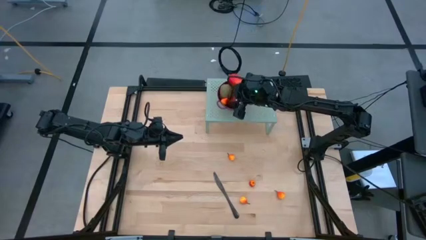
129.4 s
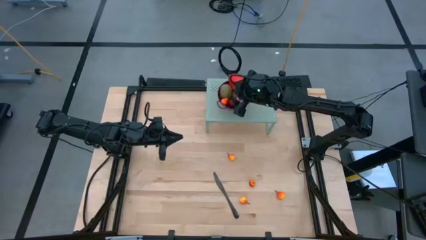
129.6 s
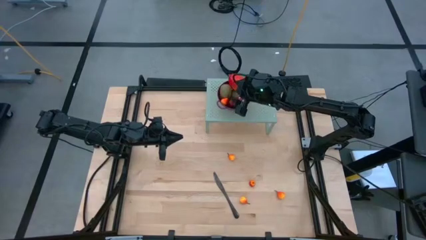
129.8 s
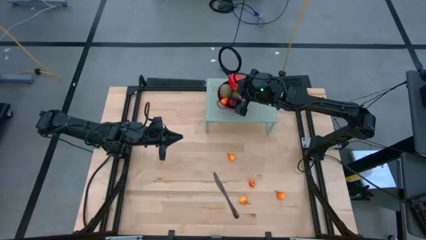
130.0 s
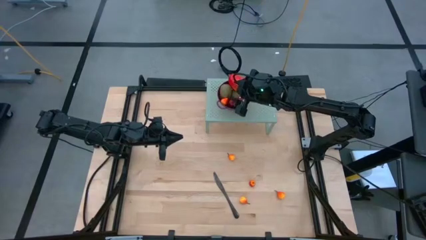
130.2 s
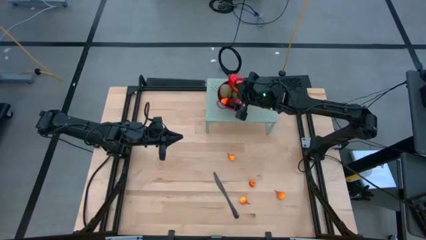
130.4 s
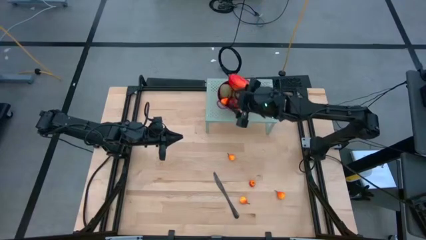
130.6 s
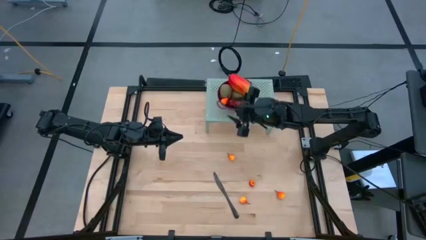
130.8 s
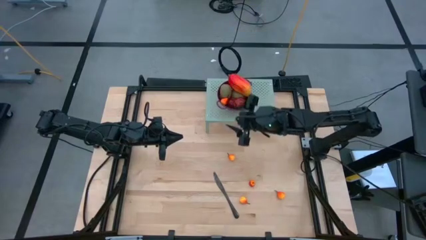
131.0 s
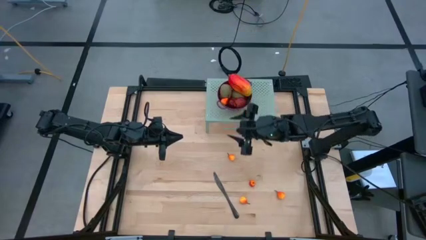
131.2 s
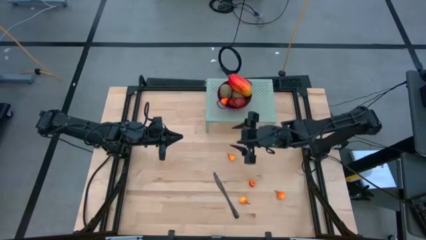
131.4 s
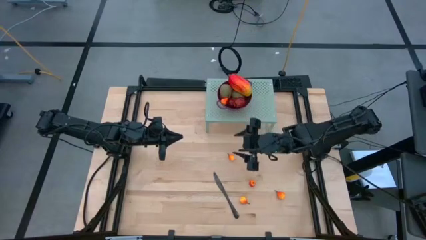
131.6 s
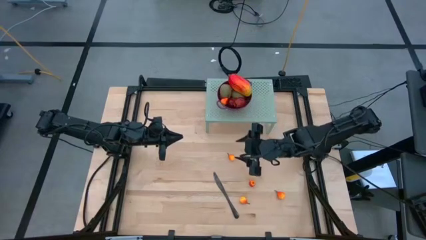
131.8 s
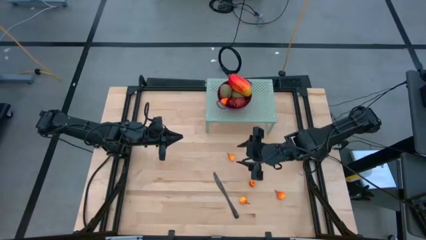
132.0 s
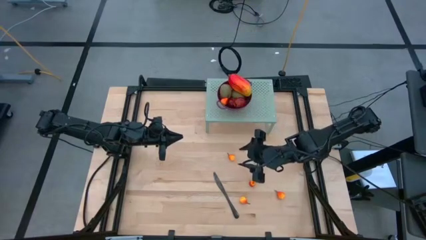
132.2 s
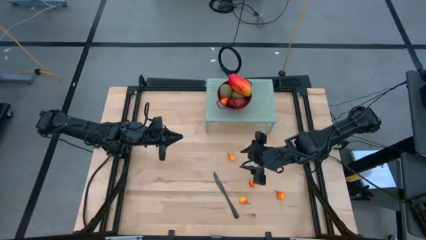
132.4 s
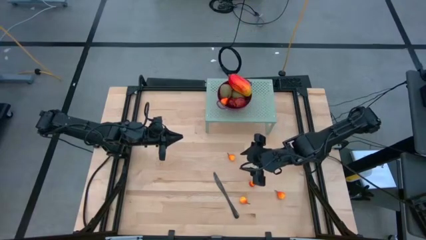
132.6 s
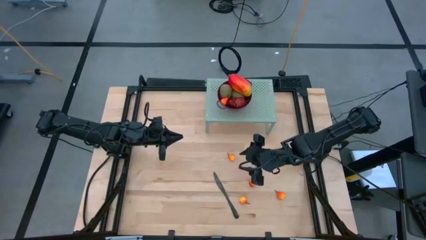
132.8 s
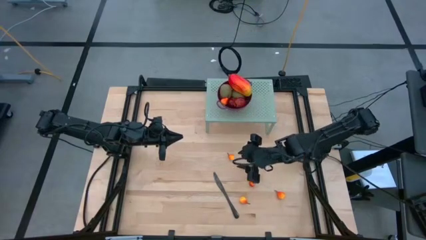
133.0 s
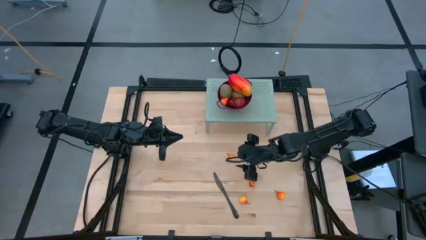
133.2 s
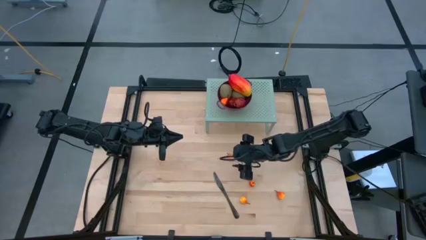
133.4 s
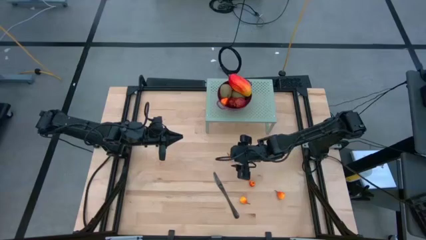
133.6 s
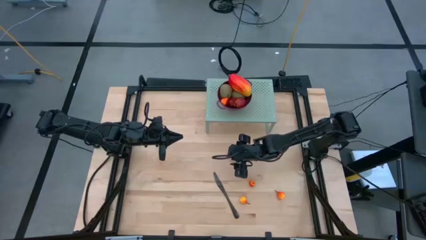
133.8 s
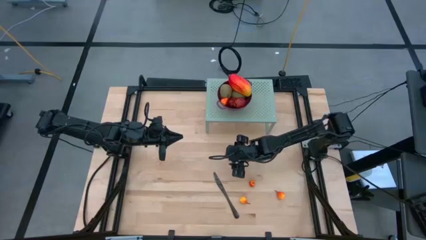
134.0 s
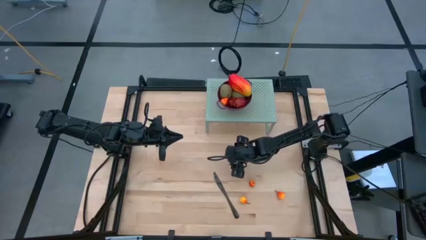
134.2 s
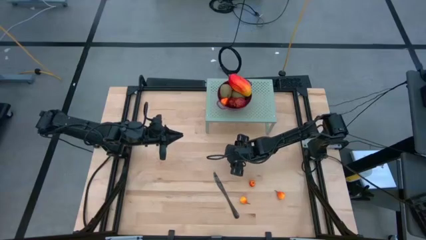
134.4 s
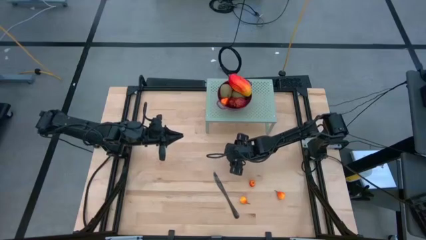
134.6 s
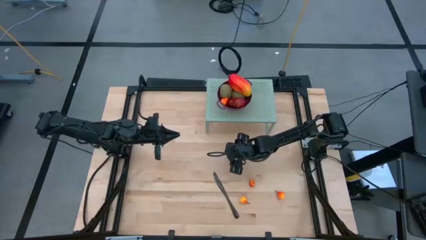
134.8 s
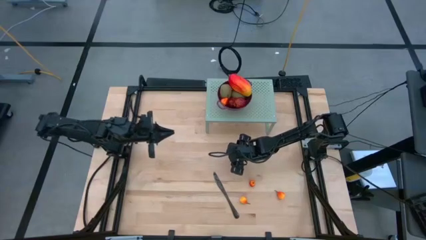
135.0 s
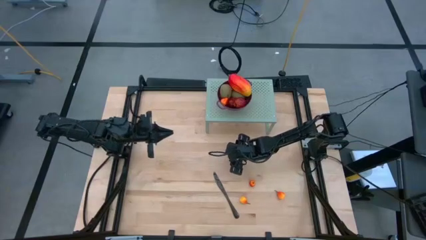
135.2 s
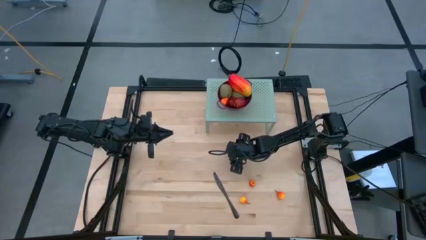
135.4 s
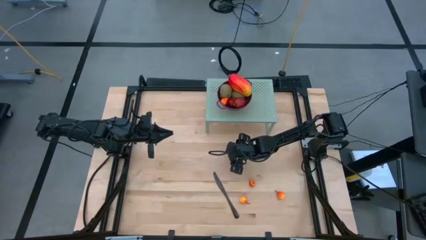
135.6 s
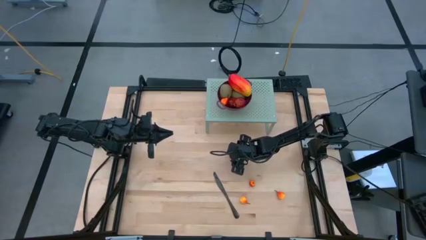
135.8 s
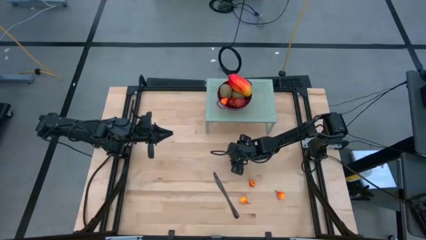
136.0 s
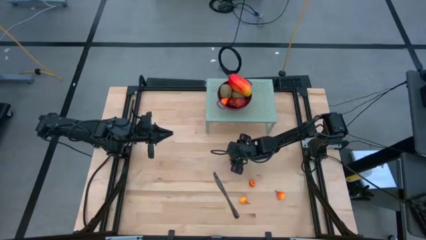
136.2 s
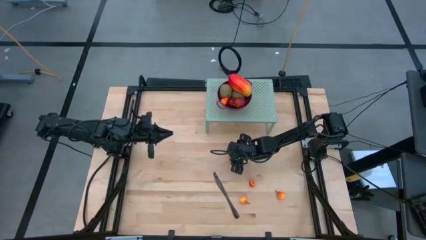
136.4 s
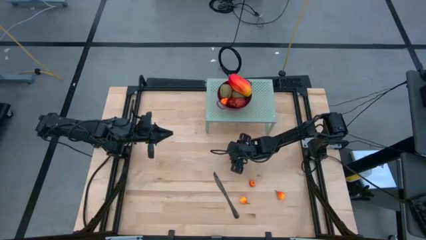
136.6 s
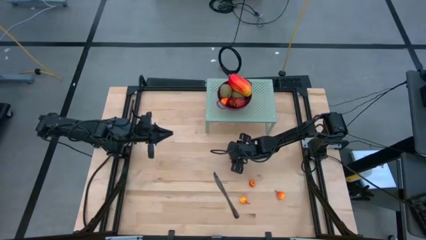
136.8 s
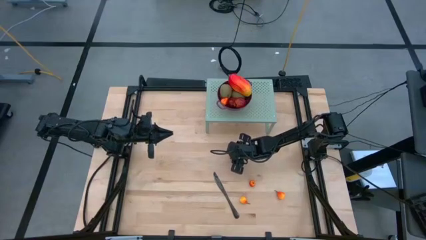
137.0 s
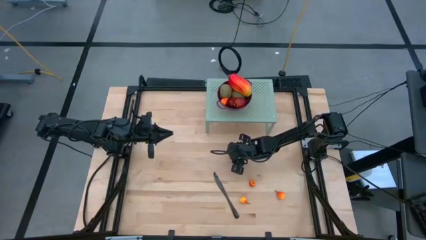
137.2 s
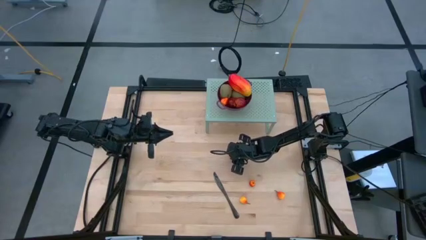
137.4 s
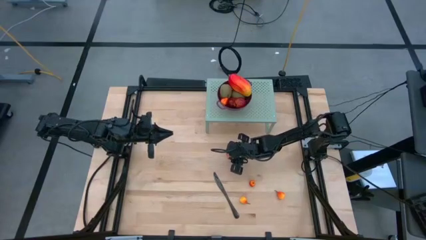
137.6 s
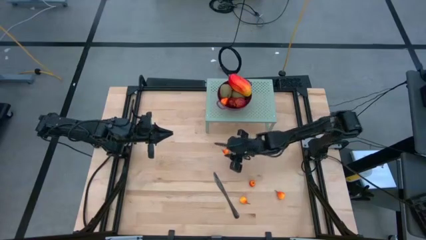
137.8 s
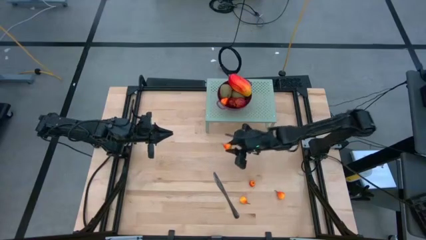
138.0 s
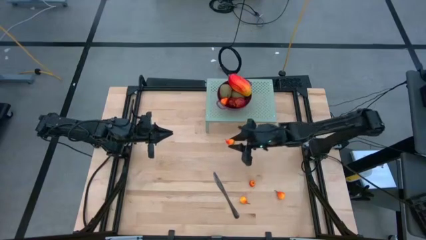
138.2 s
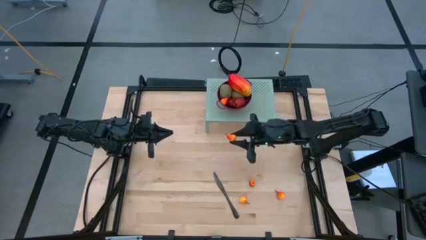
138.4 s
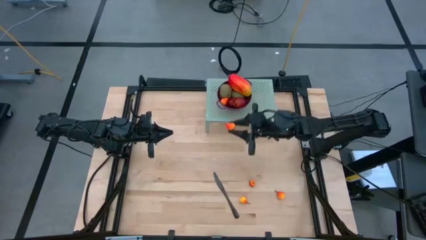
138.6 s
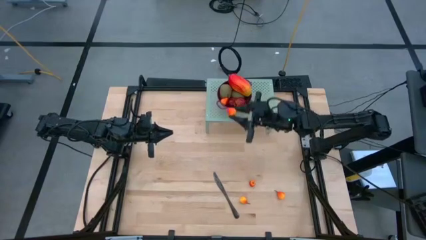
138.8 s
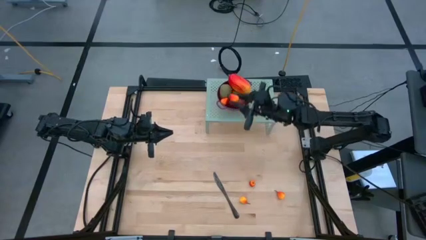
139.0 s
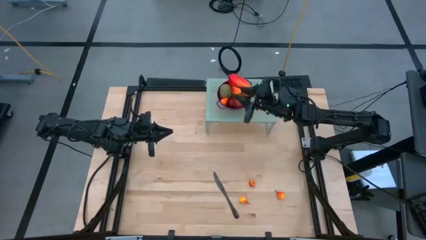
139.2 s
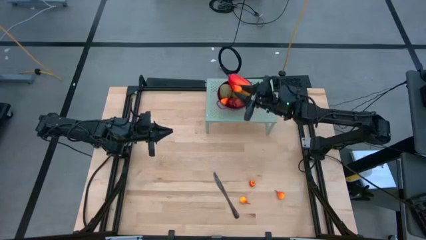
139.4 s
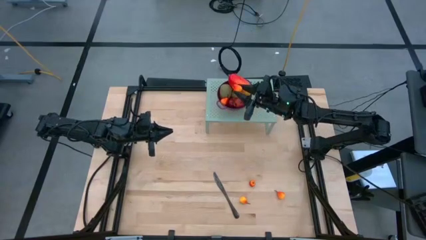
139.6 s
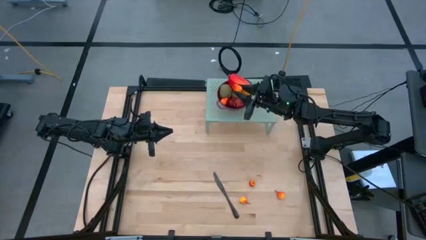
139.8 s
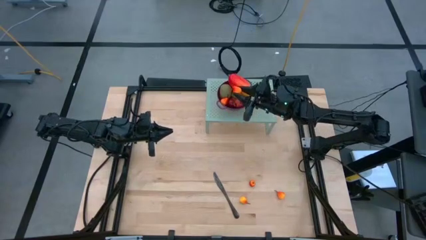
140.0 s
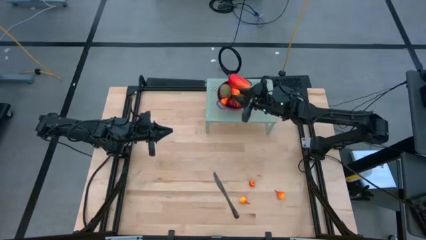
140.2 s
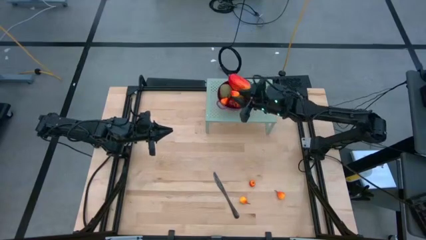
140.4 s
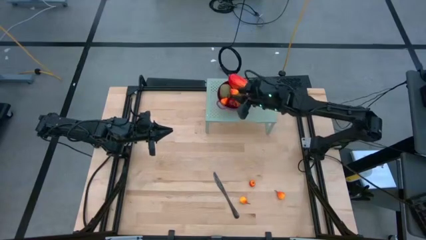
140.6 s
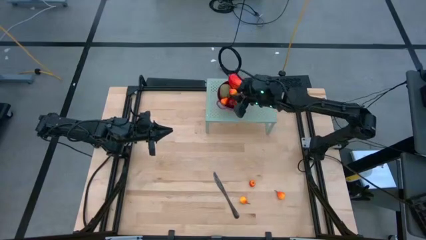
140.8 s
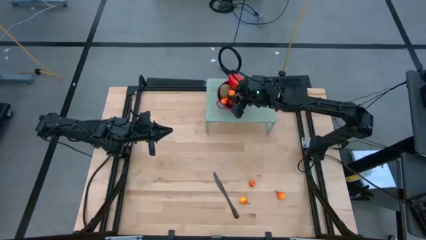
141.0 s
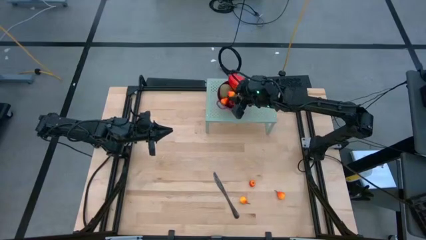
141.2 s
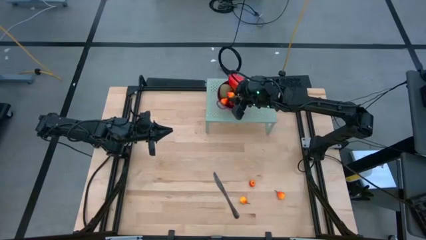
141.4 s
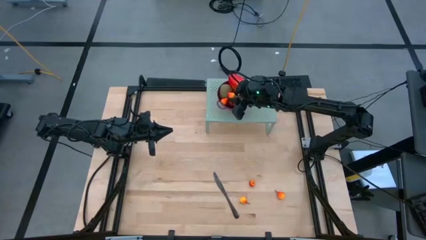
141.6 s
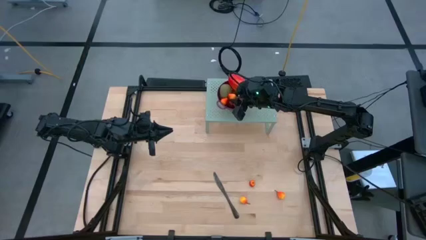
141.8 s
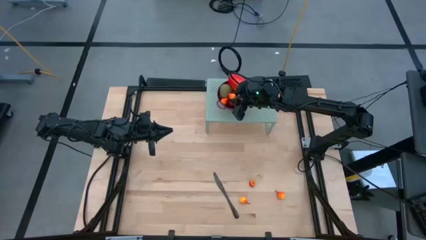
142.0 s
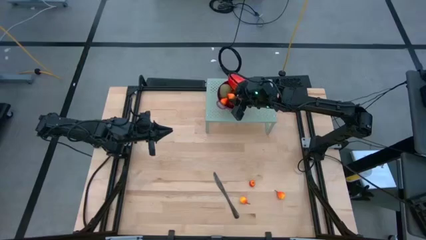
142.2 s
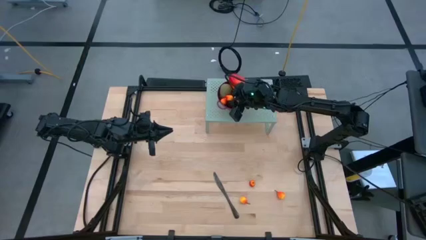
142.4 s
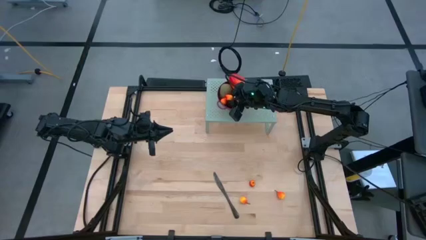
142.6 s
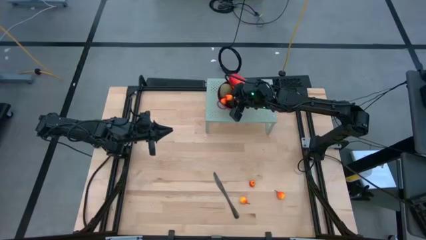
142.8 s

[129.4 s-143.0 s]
Task: Pick & Place Fruit
Put the orange pear into the violet strainer bowl on the shelf

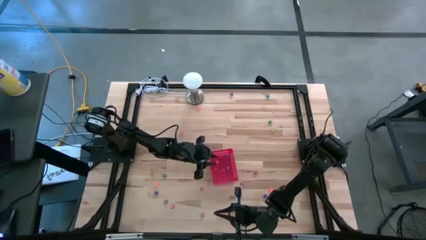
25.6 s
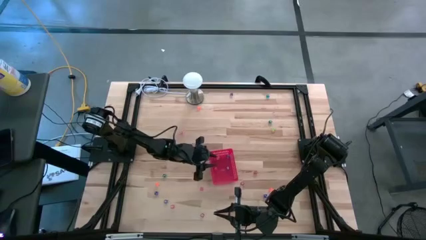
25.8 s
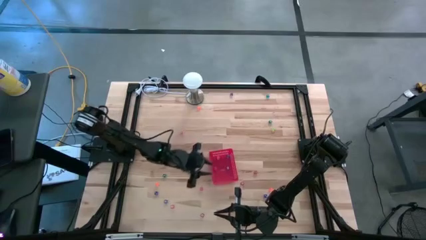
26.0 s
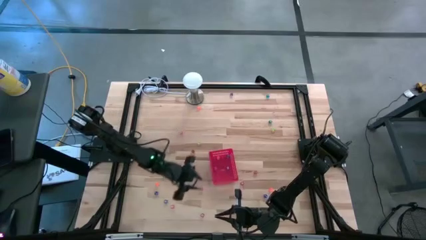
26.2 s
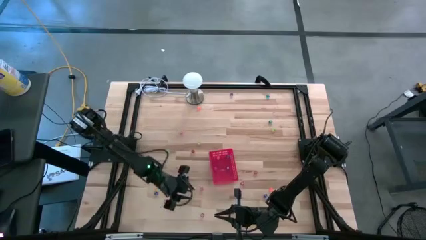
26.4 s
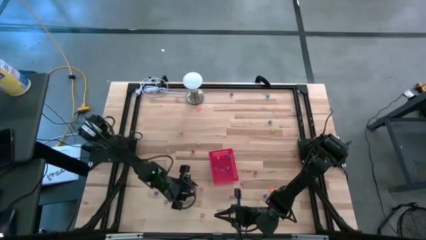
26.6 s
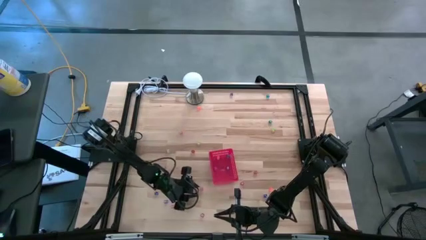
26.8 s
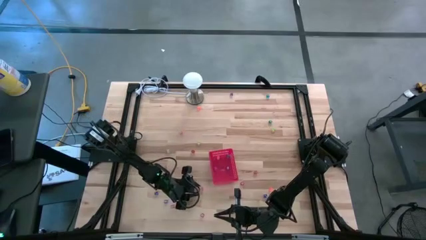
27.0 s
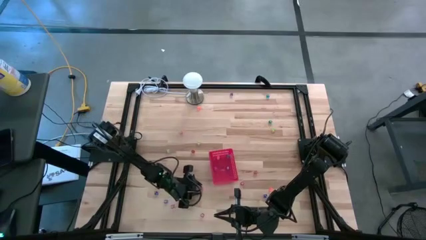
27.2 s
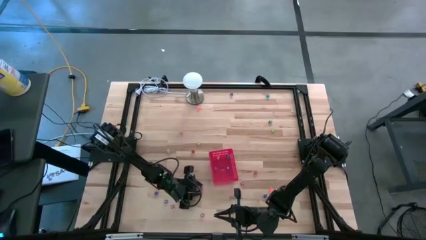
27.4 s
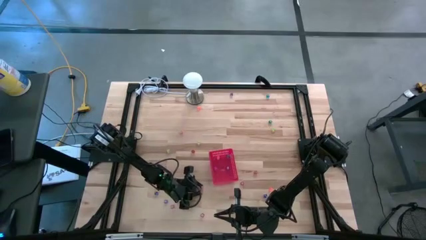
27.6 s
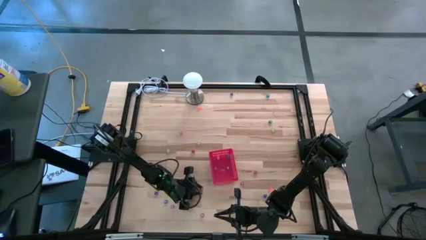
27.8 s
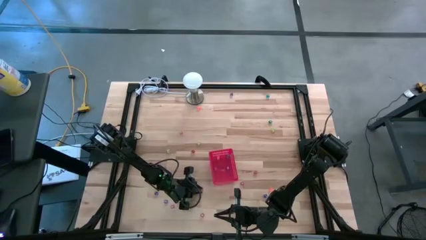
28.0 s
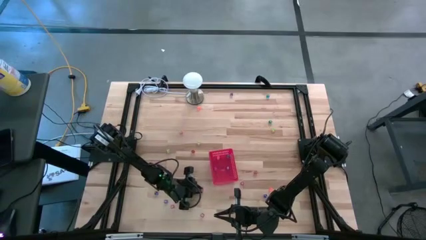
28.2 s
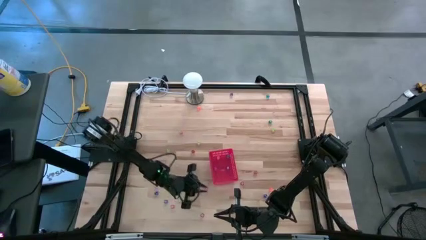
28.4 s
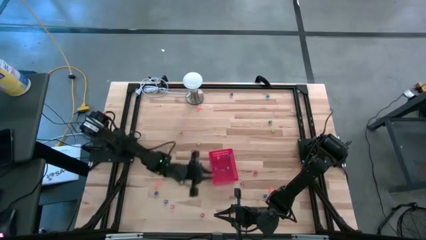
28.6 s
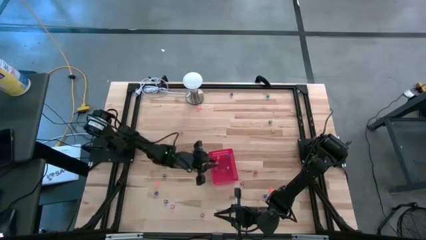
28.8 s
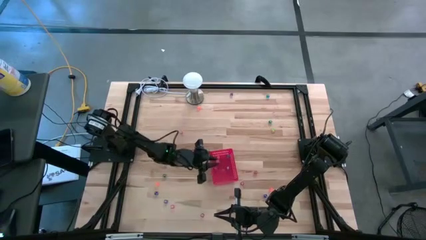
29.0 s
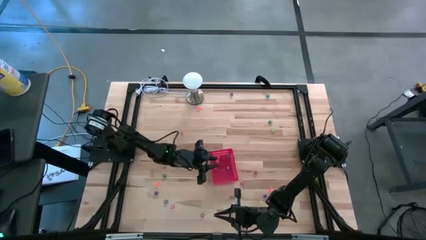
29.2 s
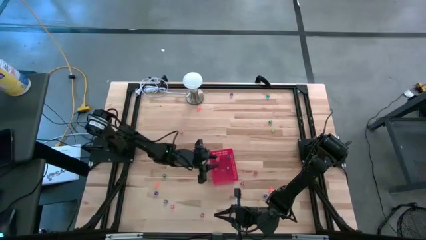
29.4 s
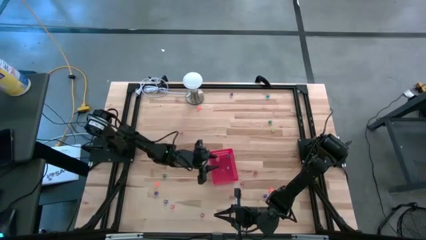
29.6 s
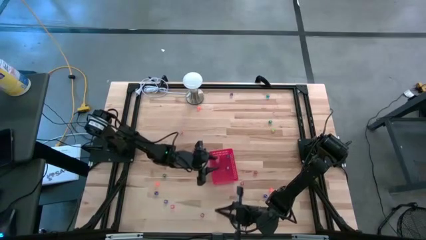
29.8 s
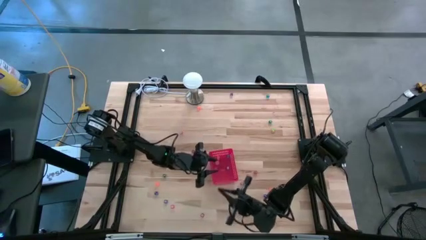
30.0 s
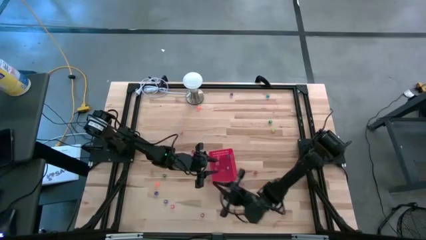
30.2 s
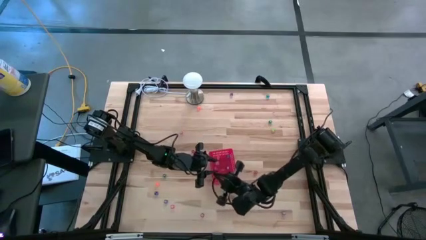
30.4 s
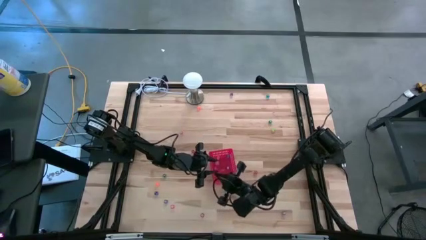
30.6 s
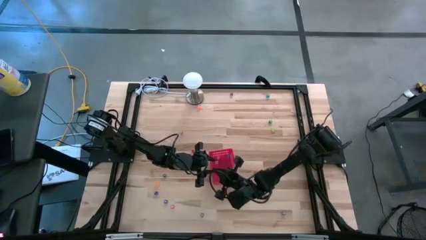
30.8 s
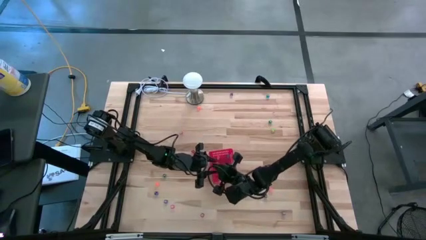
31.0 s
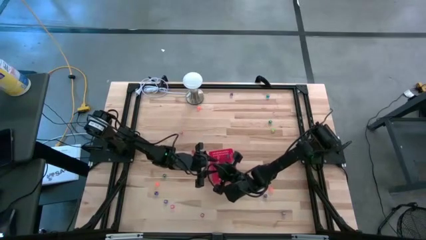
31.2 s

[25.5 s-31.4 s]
Task: Pick & Place Dice
Put the pink die into the red basket
